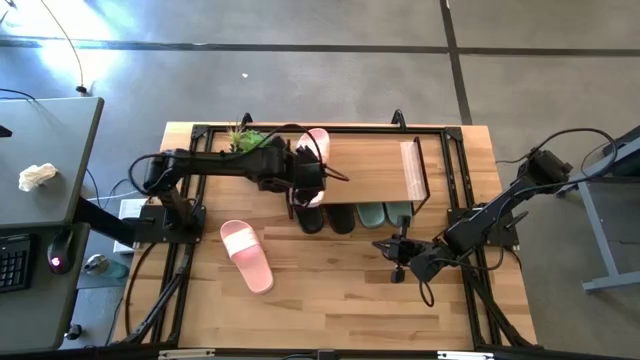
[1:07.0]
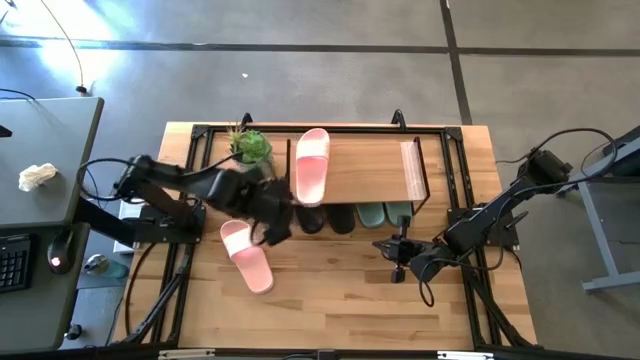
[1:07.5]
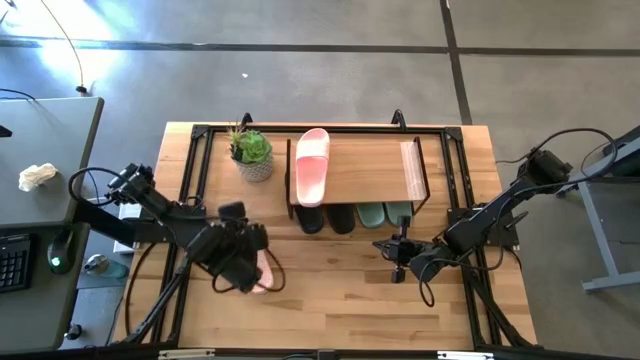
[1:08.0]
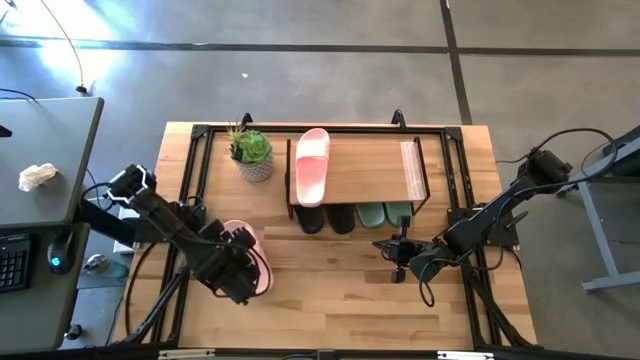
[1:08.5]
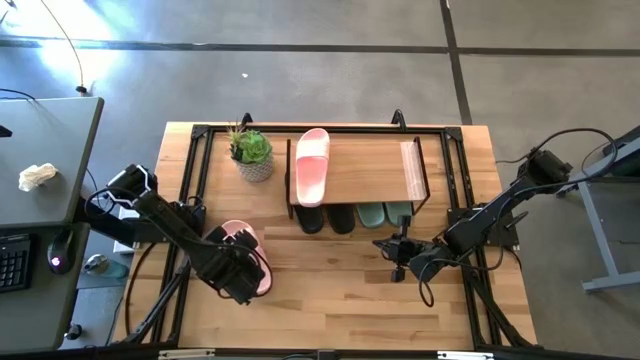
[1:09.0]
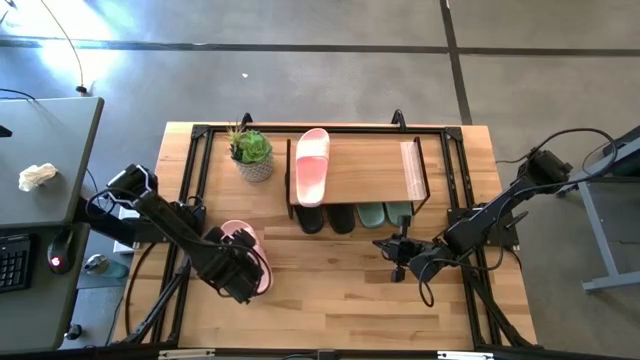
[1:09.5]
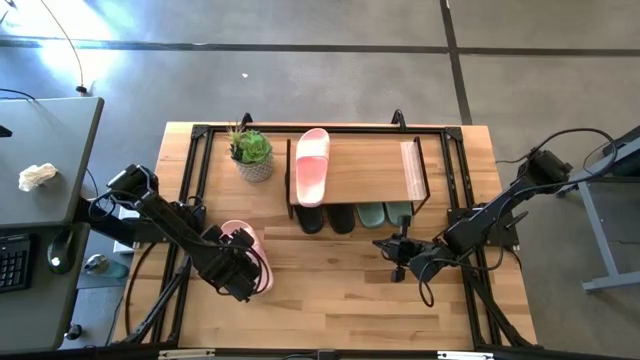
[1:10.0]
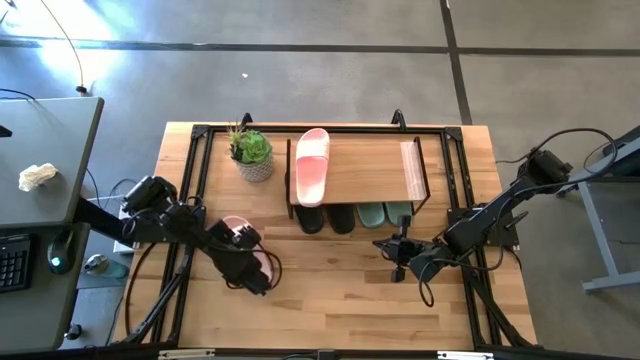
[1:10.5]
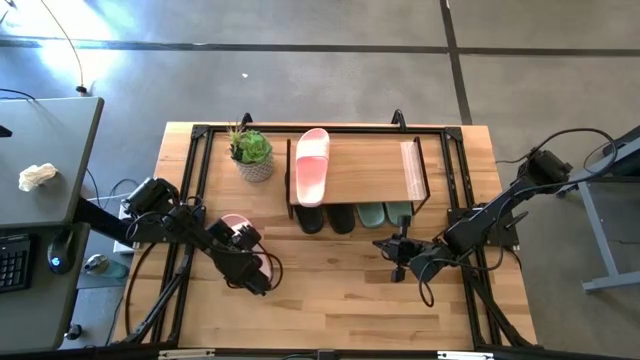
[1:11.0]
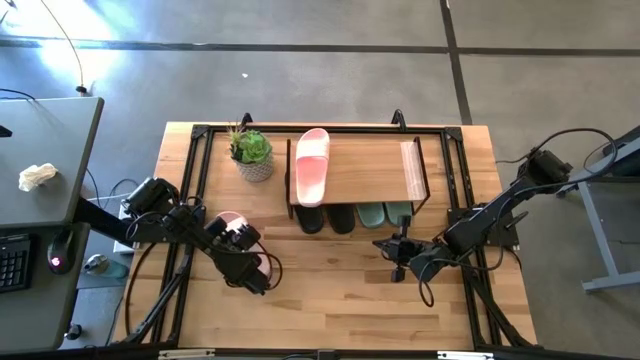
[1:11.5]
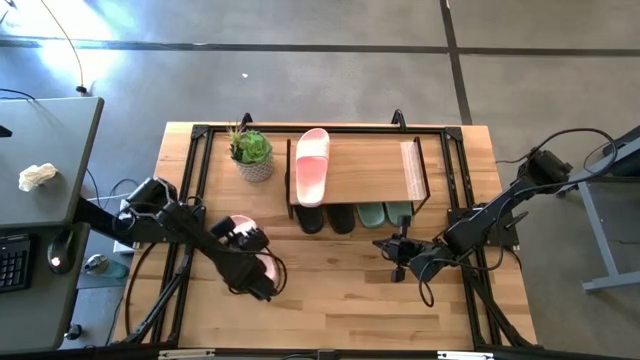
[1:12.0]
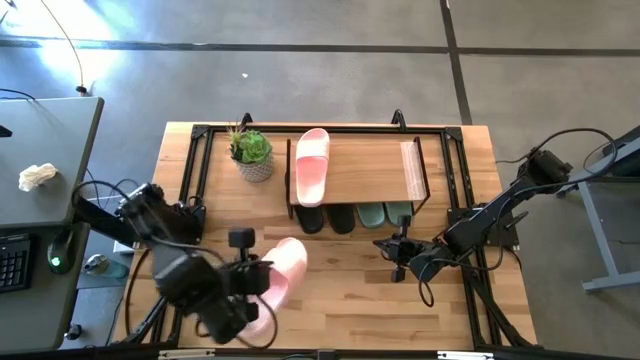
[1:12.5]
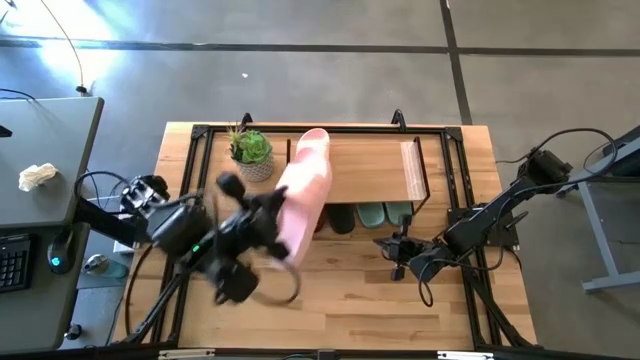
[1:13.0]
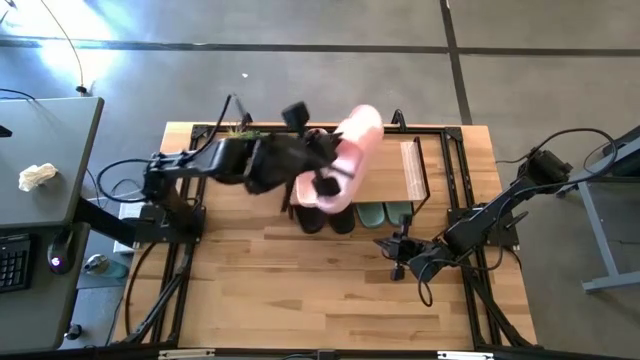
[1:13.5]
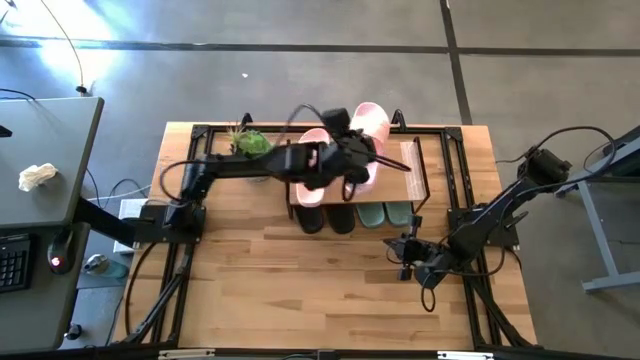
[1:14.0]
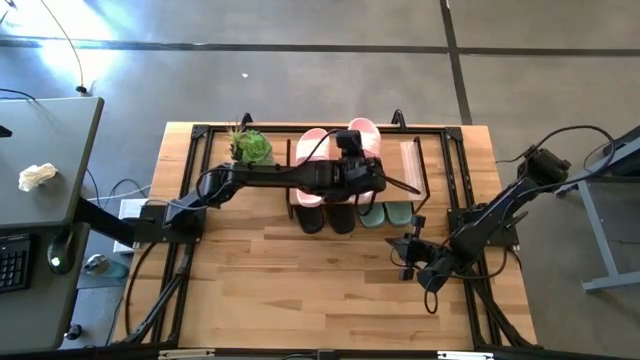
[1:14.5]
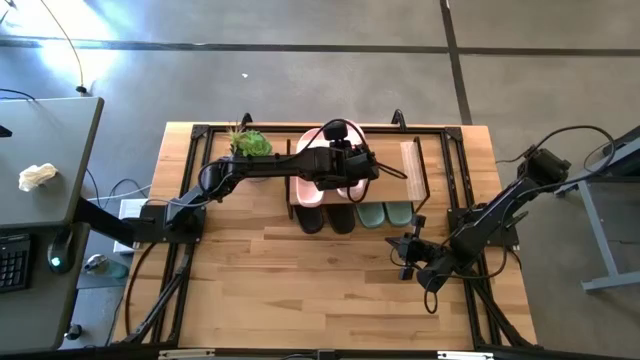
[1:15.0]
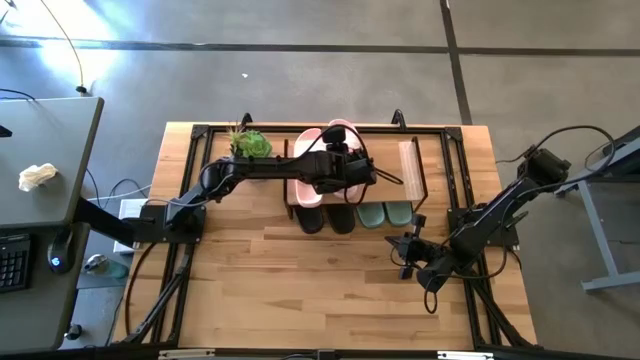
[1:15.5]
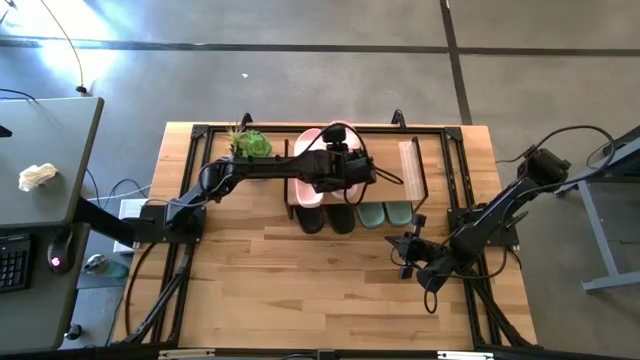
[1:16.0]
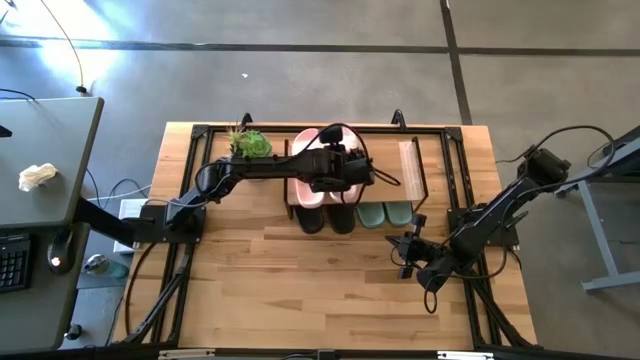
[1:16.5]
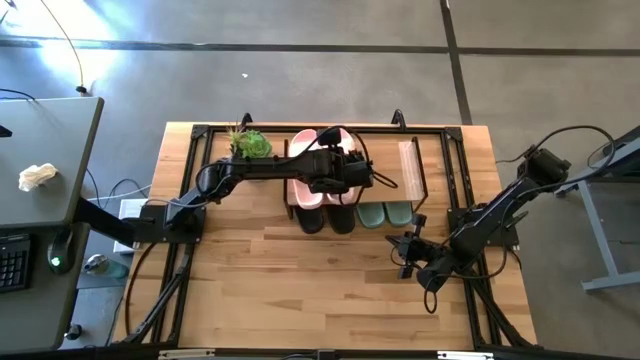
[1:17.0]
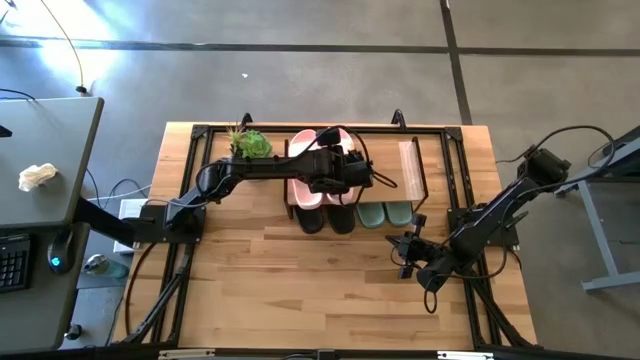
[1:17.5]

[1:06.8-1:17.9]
Task: Pick and place slides into the shelf
Put the pink slipper on the shelf

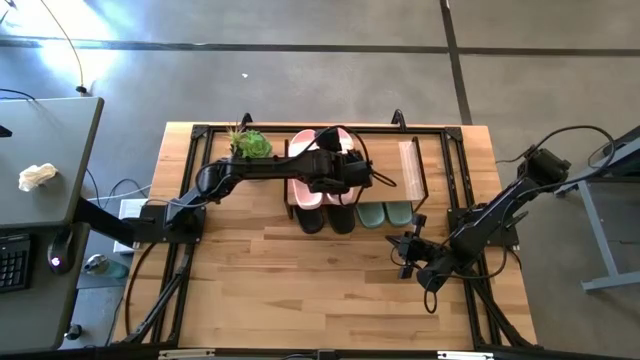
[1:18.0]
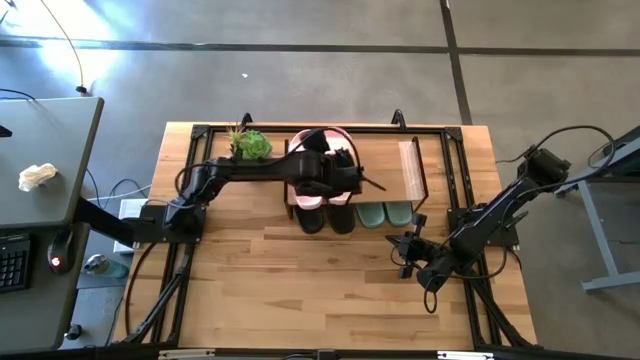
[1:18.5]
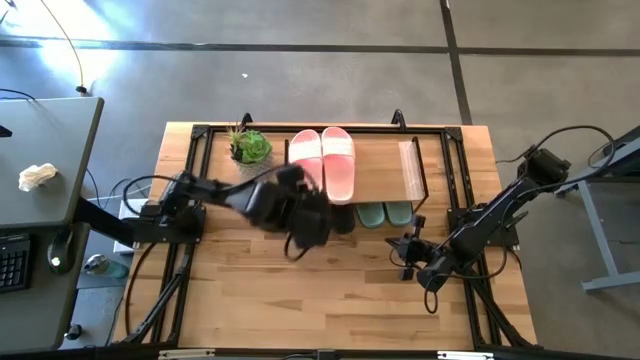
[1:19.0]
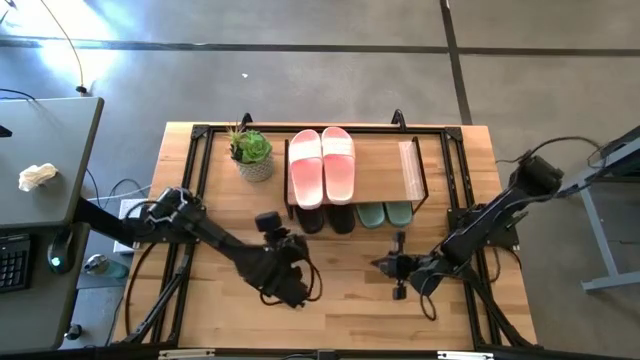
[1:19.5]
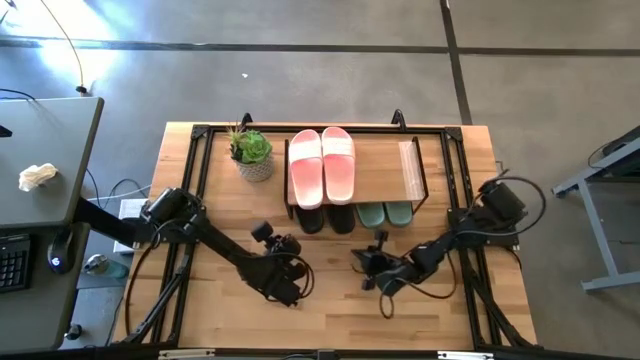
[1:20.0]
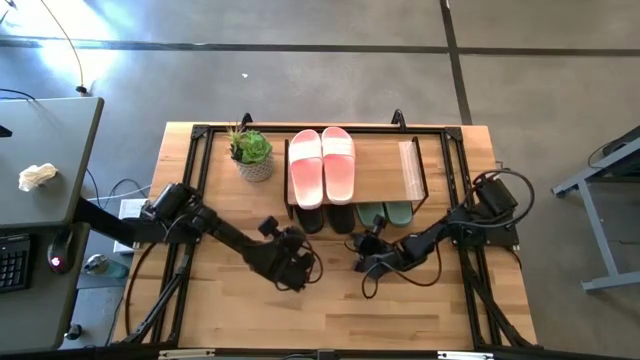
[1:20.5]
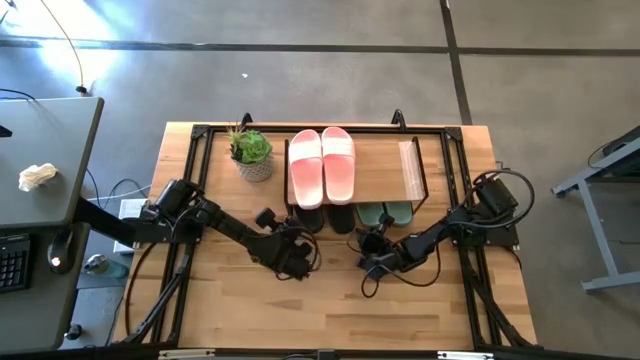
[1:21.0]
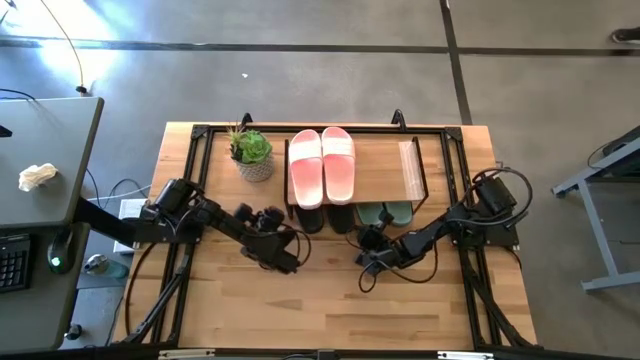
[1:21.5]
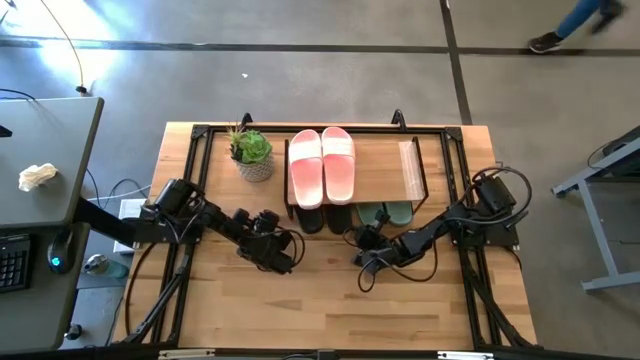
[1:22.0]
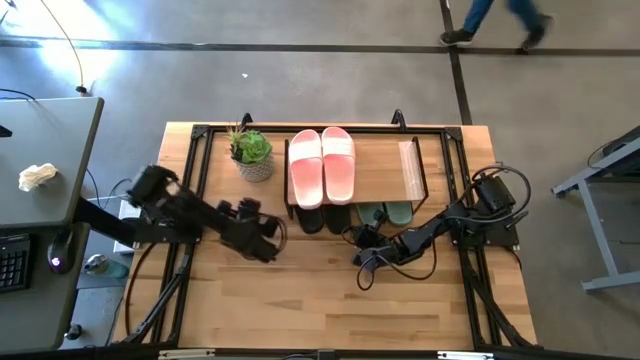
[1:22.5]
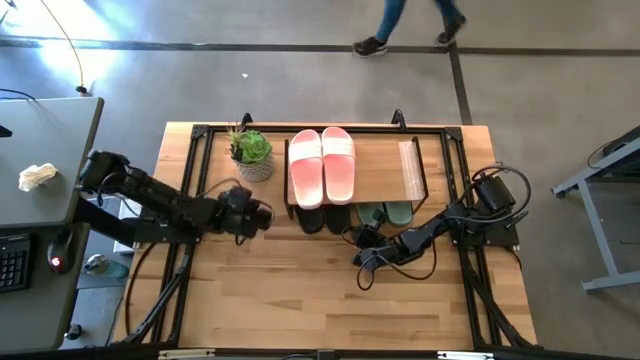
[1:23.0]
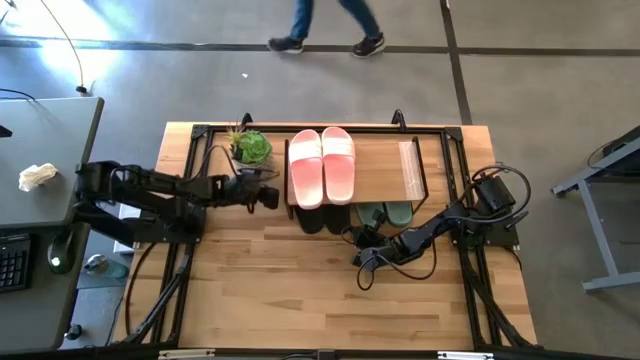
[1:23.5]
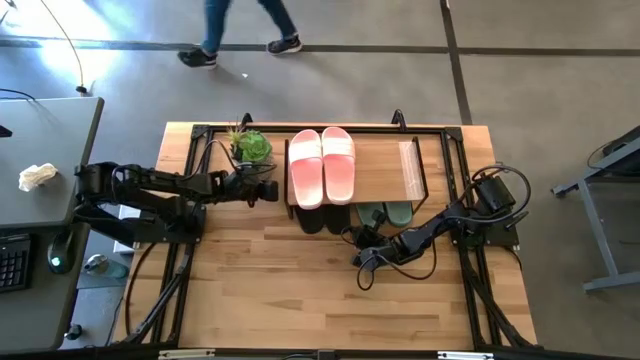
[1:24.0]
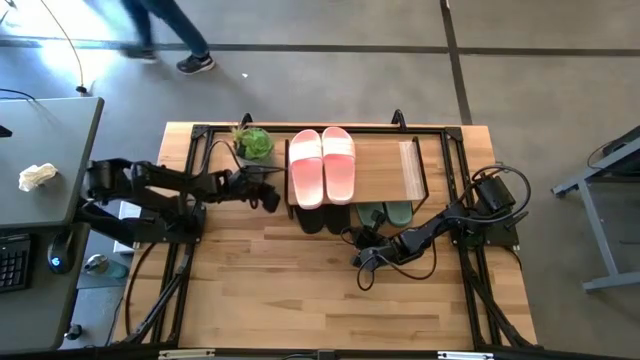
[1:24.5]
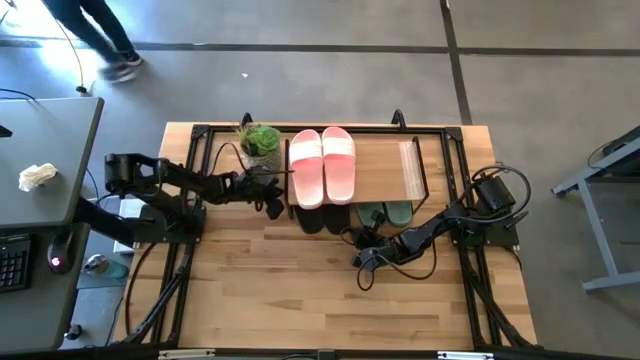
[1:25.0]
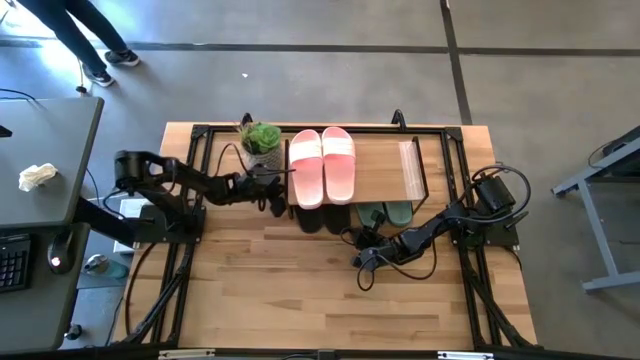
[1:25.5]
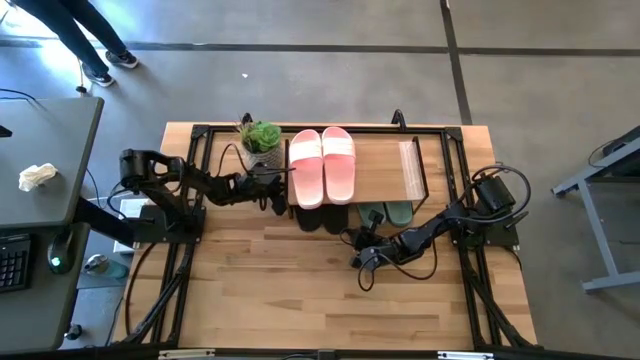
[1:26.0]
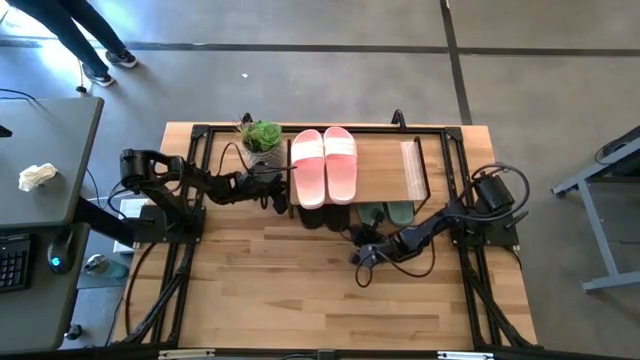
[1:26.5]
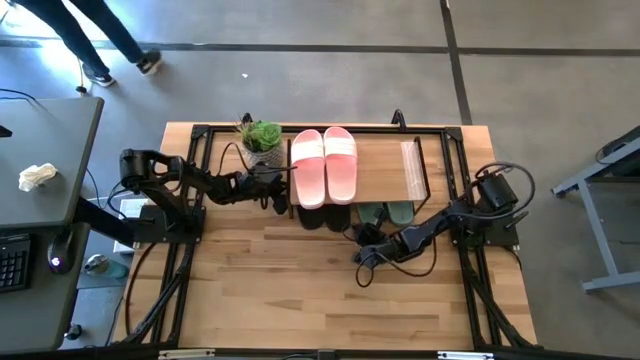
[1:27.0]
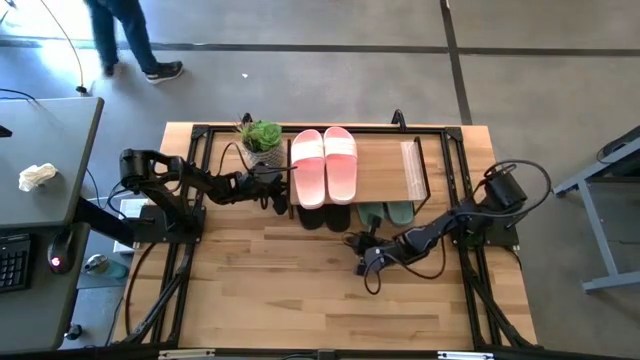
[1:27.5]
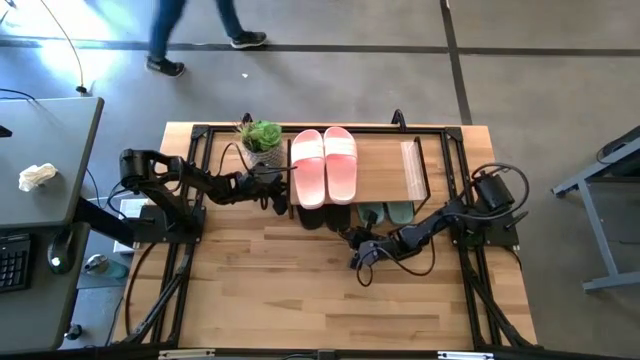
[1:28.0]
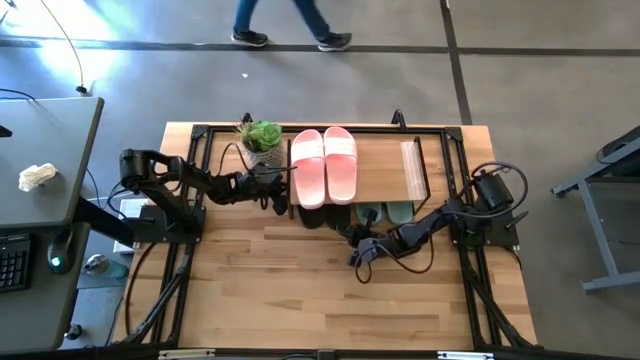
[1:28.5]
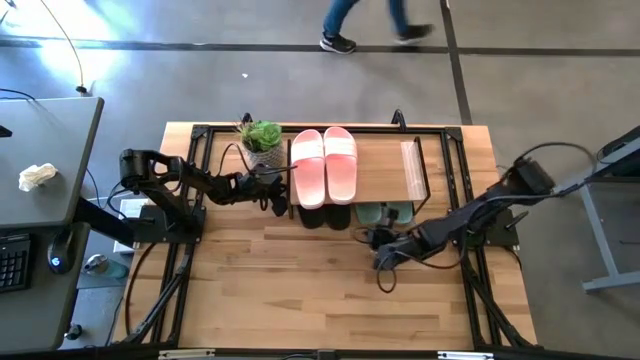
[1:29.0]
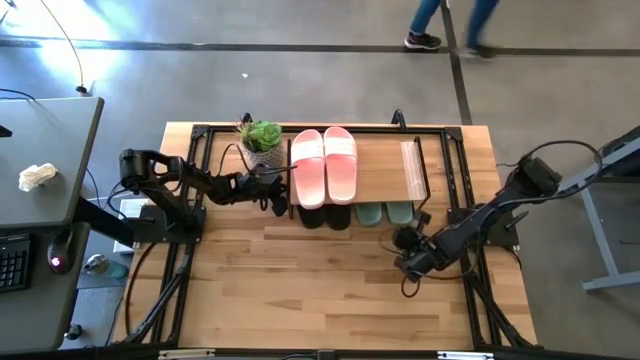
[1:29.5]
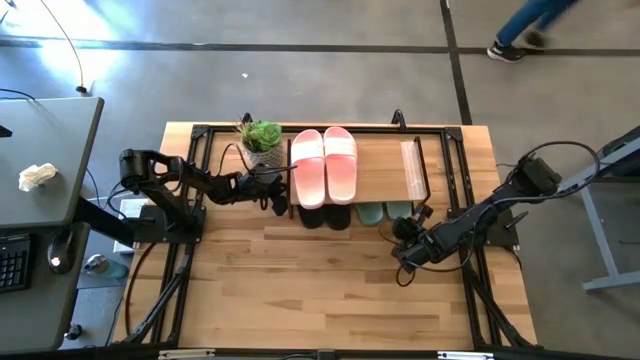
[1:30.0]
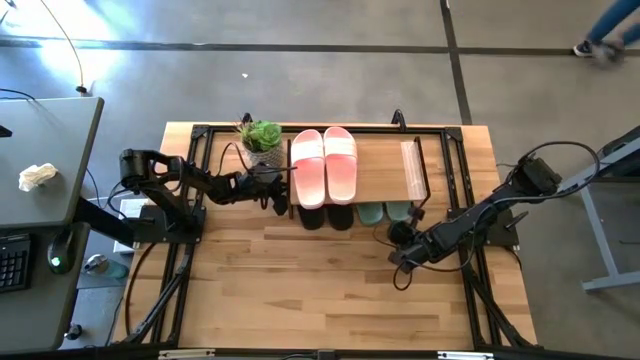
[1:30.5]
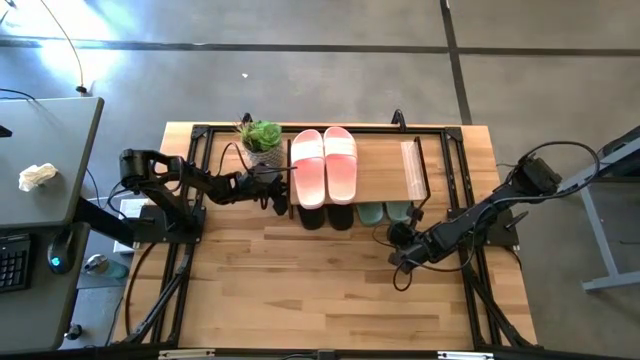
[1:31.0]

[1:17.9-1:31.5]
Adjust the slippers under the shelf
